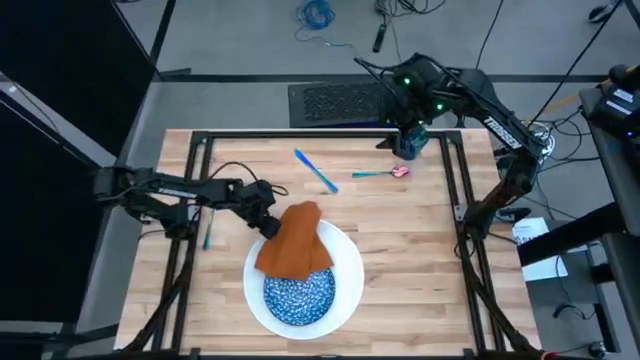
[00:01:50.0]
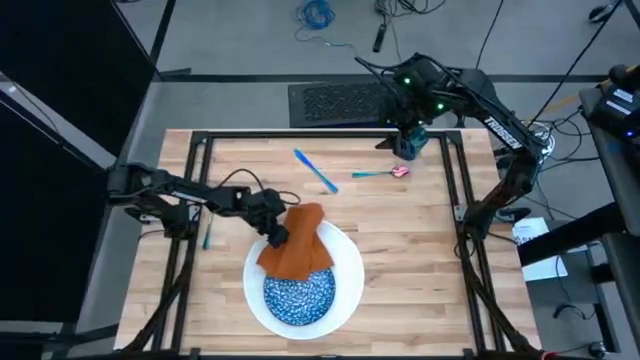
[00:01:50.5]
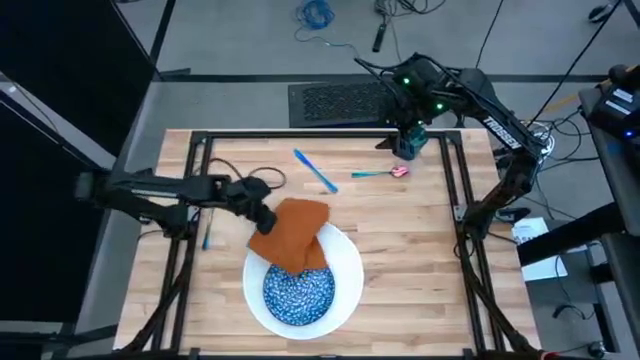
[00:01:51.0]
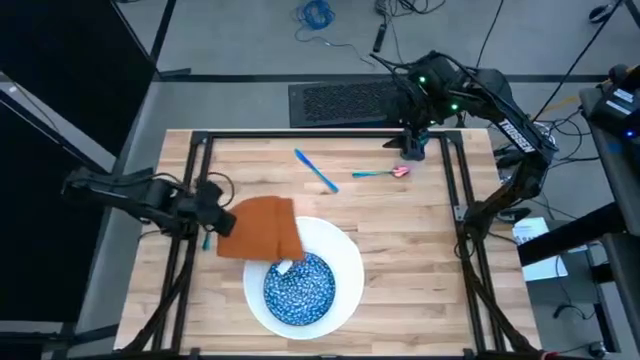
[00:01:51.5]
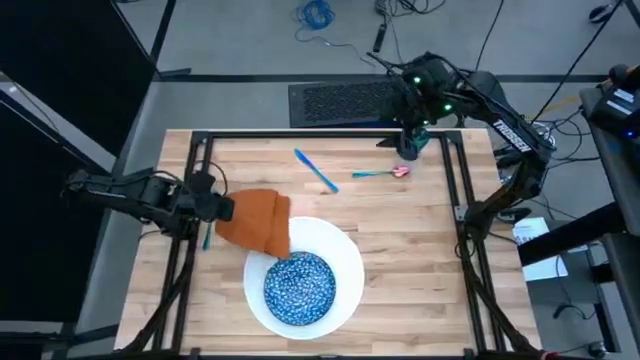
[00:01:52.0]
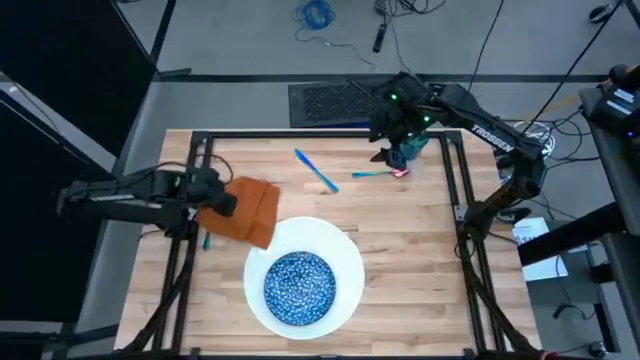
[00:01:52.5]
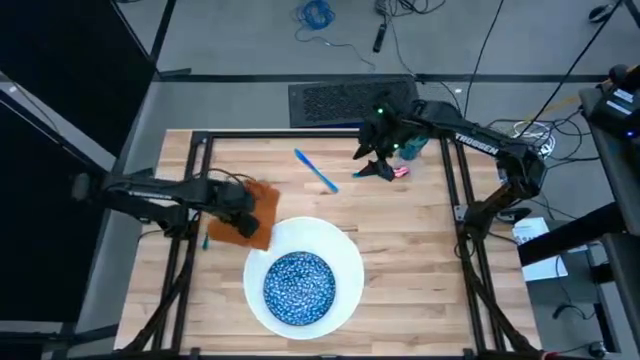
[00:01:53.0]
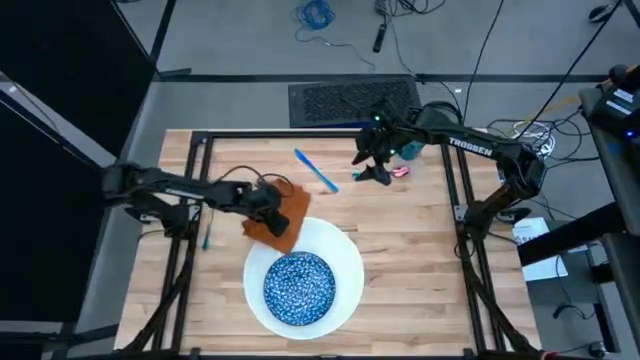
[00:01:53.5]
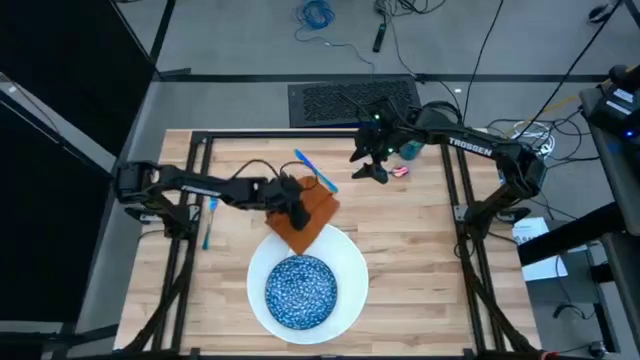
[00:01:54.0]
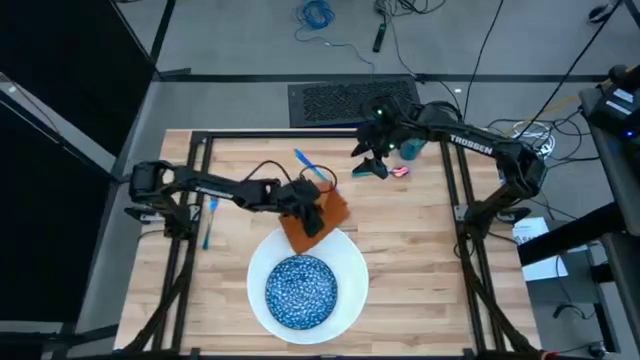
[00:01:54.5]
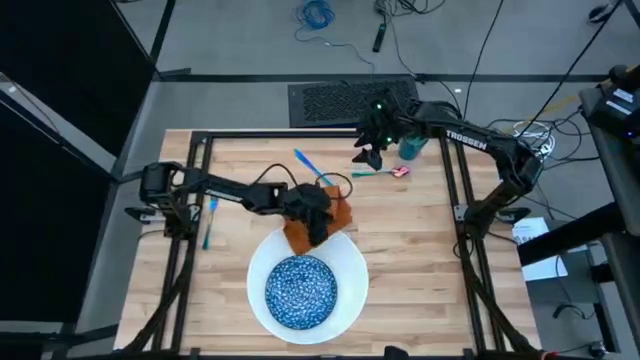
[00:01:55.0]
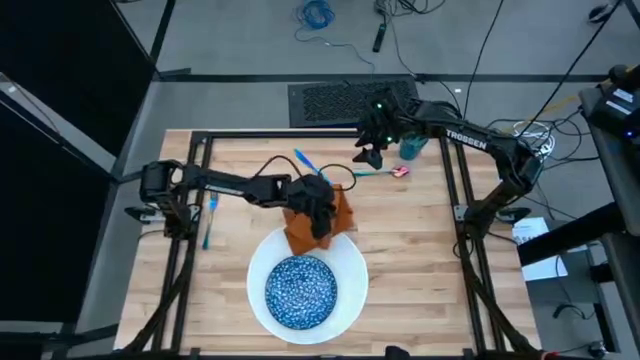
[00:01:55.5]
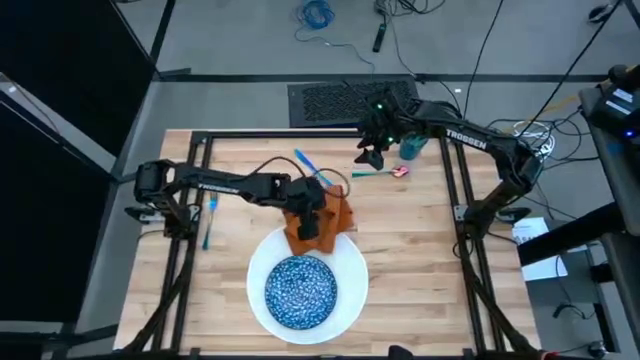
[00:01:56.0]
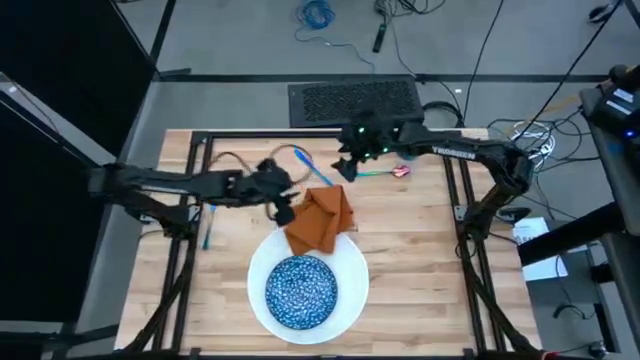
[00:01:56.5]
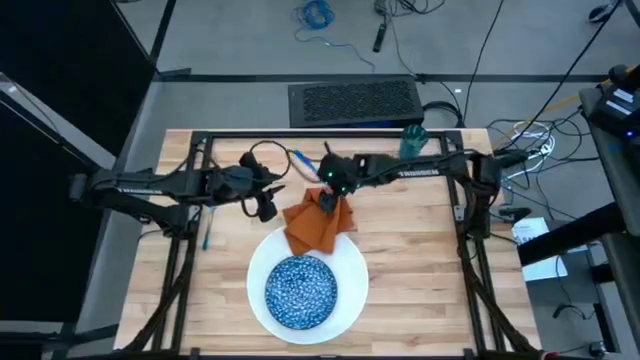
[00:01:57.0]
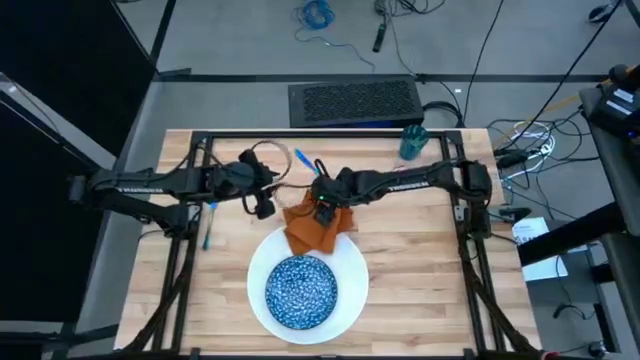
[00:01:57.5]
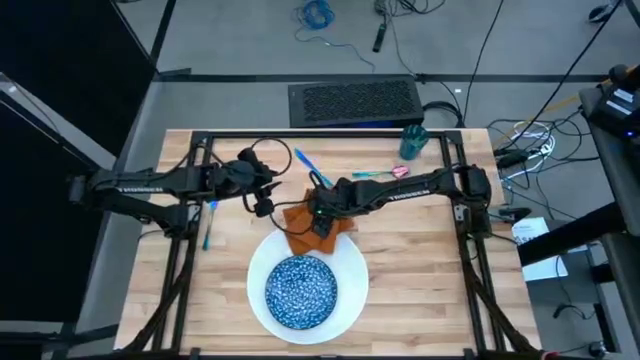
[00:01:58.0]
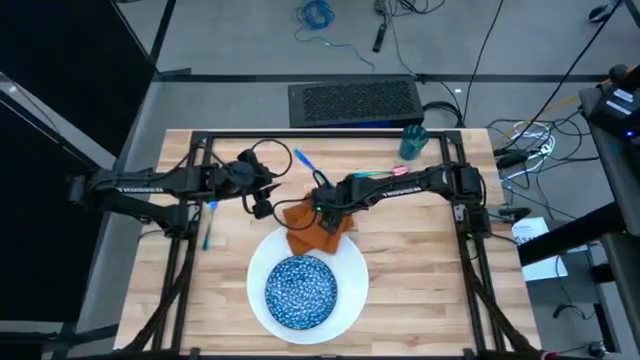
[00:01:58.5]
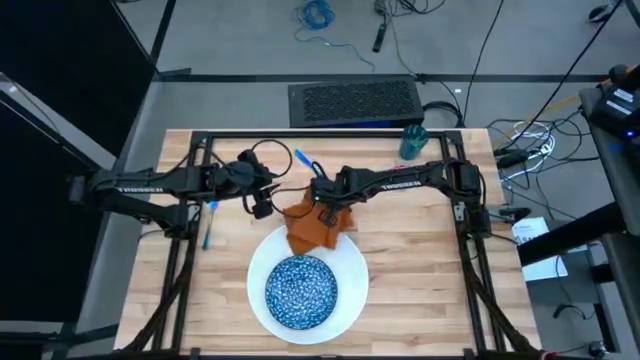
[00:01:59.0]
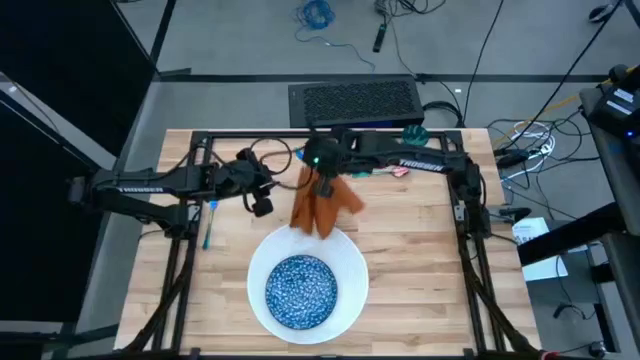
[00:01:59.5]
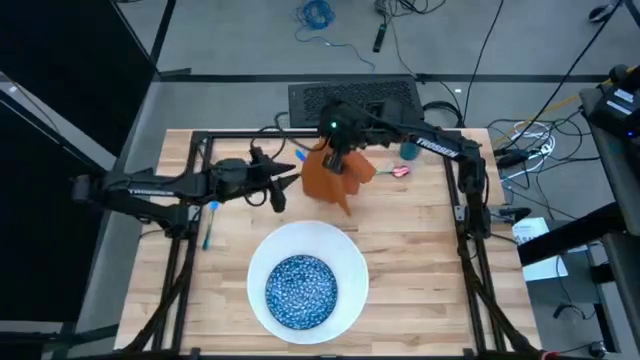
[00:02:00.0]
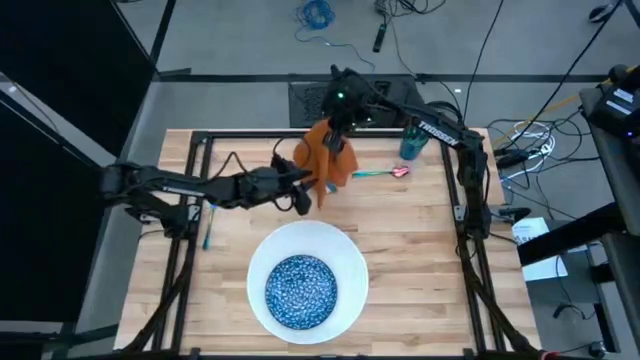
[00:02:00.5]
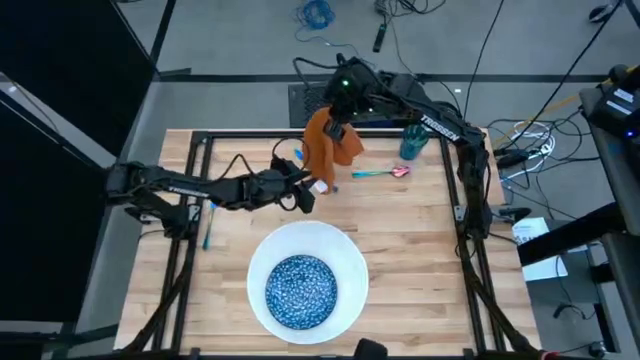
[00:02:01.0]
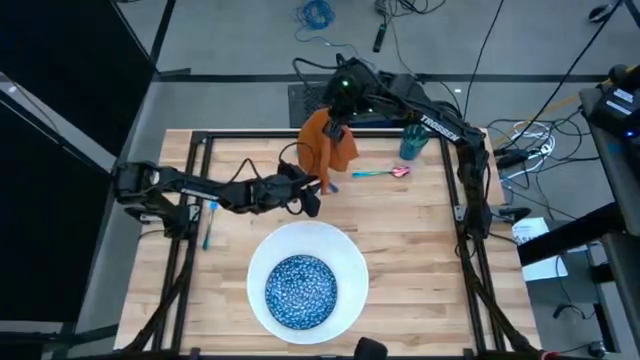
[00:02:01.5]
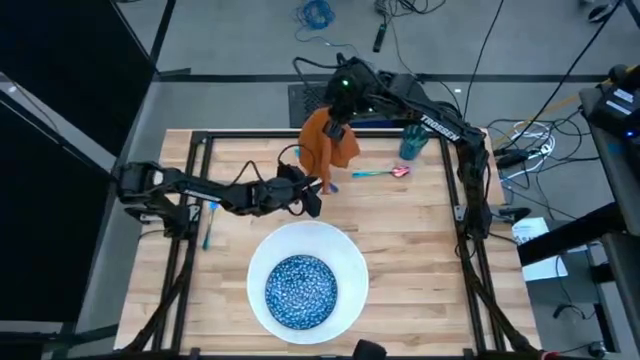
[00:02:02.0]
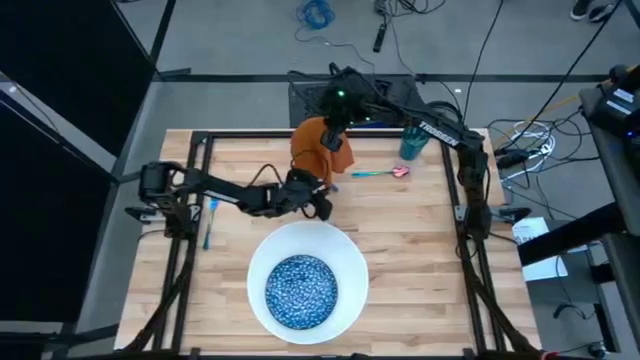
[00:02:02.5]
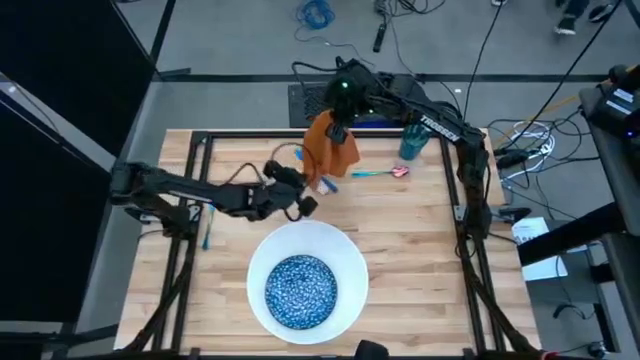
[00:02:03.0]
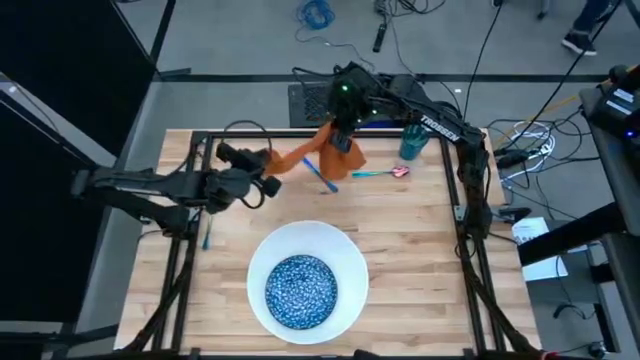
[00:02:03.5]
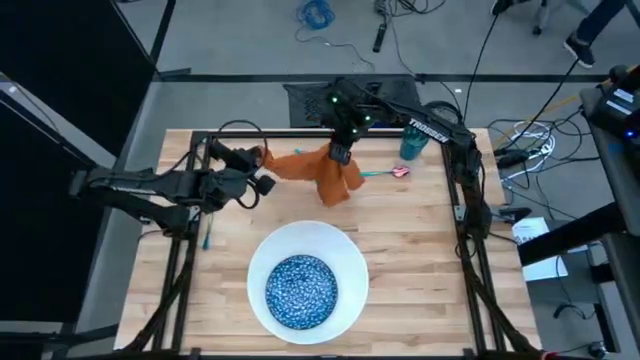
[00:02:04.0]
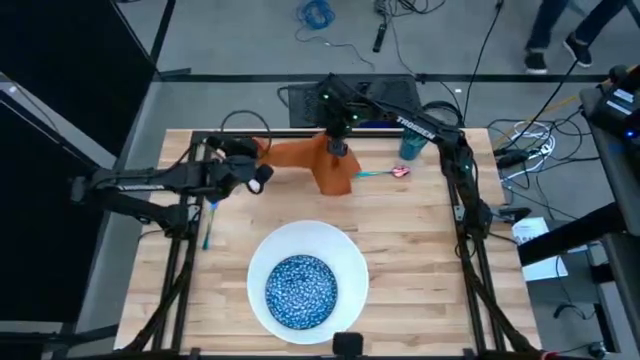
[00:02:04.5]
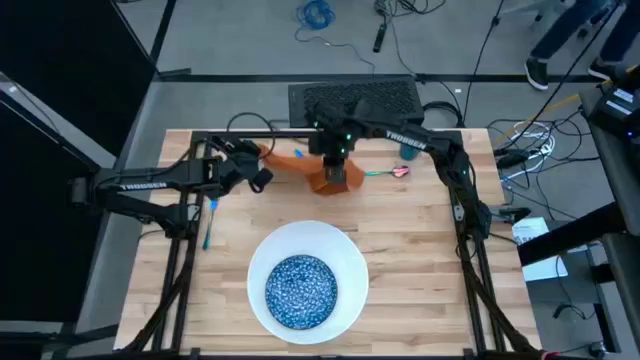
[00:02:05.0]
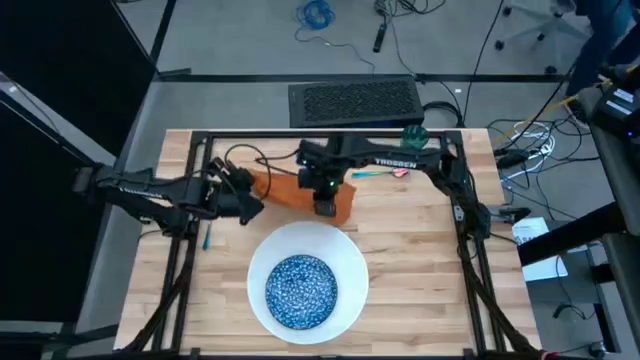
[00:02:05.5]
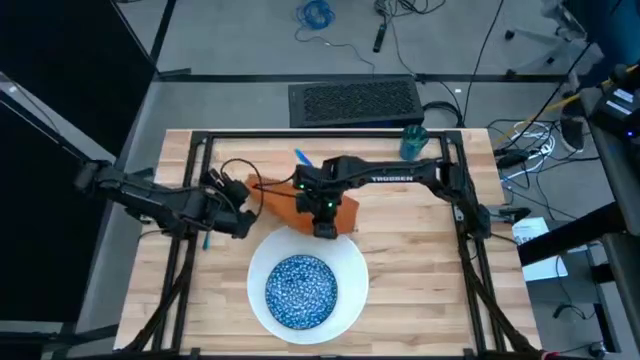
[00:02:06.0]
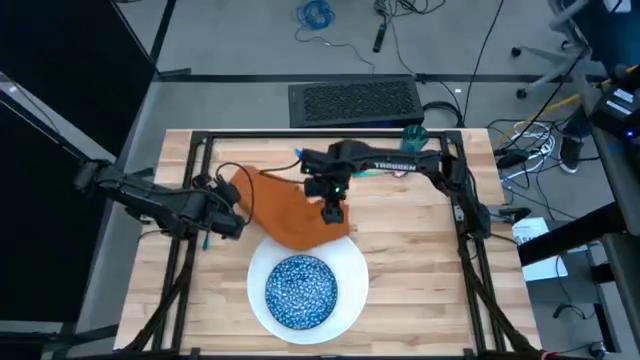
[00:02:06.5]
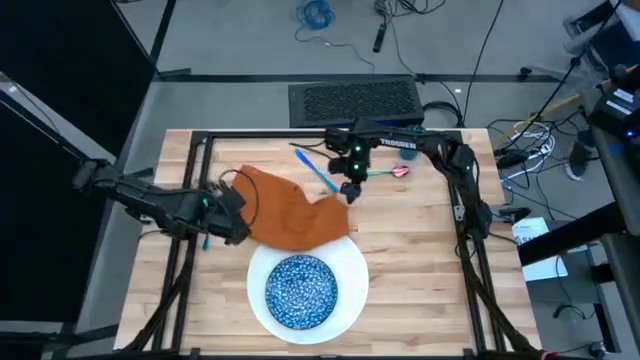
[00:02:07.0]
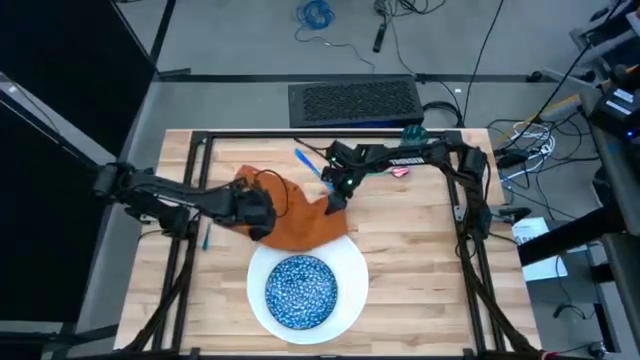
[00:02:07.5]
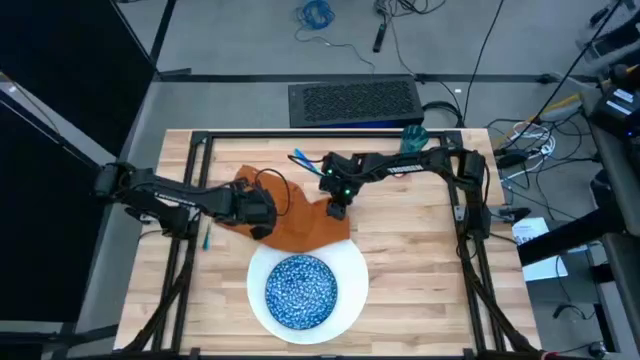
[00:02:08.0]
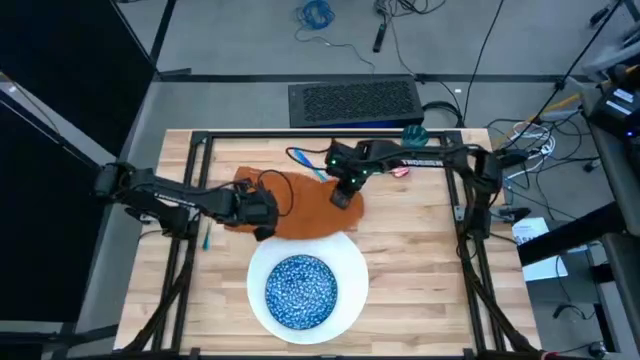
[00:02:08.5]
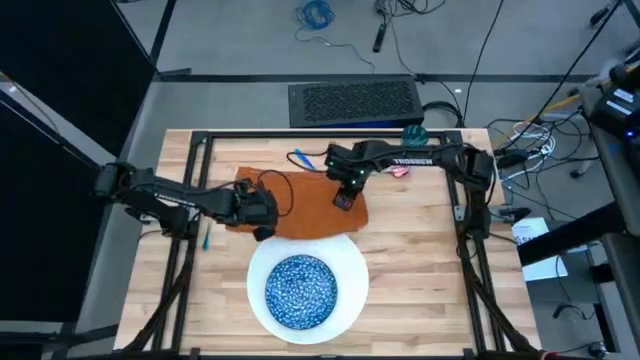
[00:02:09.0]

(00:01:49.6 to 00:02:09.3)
Task: Set table place
Fold the orange table napkin

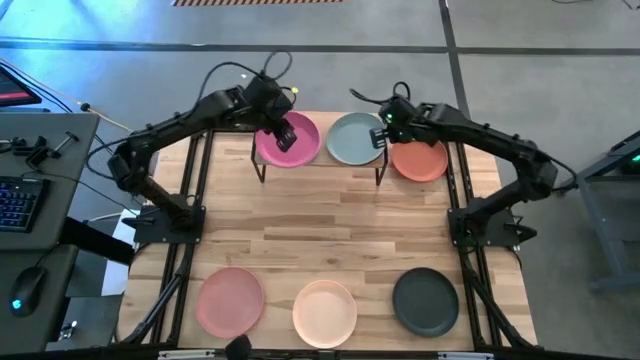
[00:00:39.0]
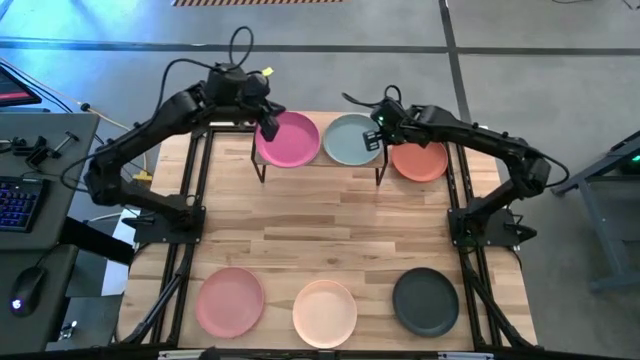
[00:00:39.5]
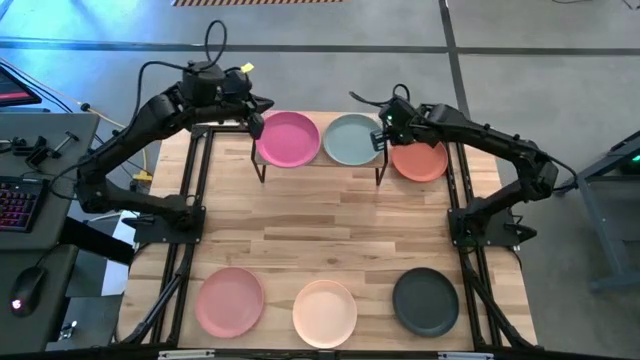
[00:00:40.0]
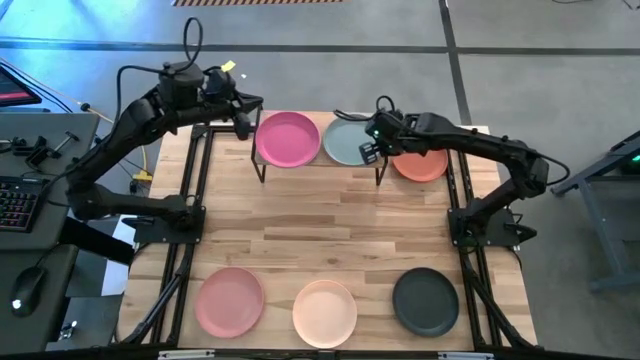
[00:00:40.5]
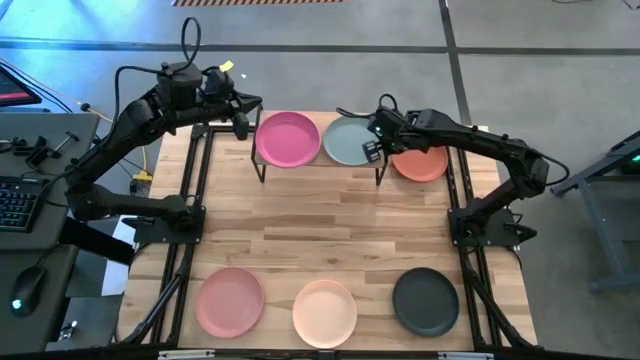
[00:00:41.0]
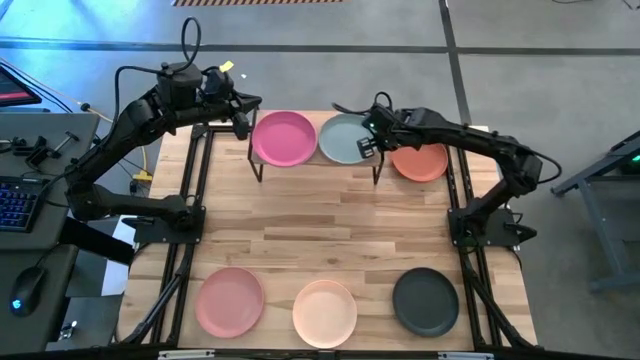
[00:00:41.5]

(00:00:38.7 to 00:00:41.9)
Task: Place and stack plates onto a shelf
Adjust the gray on the shelf
